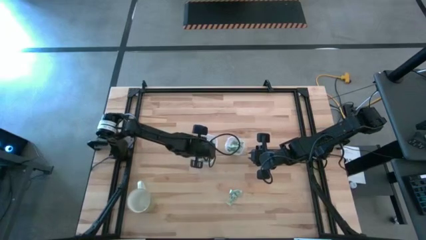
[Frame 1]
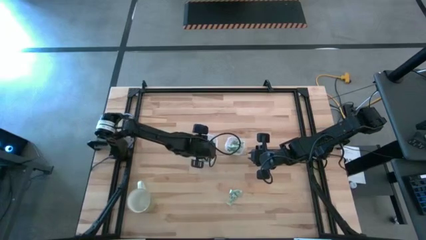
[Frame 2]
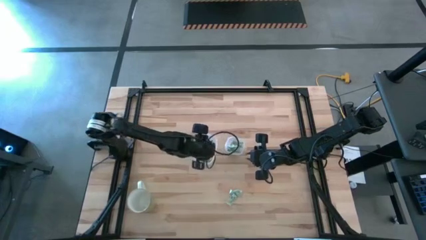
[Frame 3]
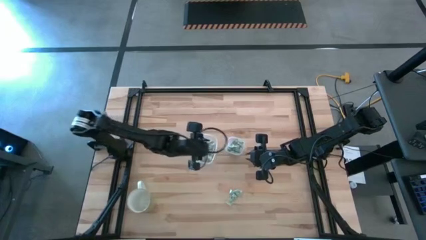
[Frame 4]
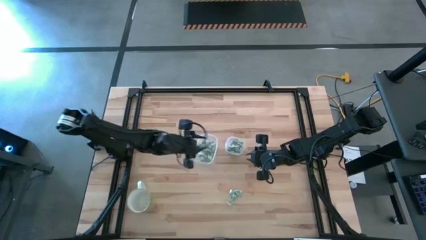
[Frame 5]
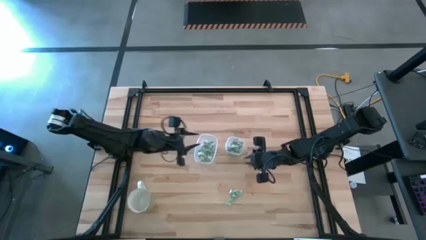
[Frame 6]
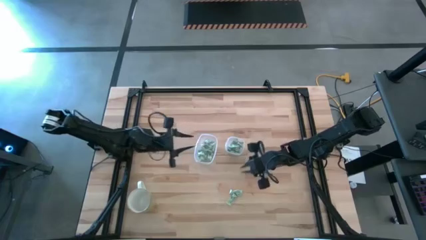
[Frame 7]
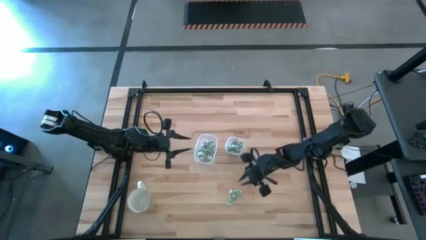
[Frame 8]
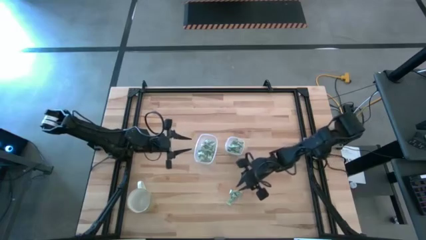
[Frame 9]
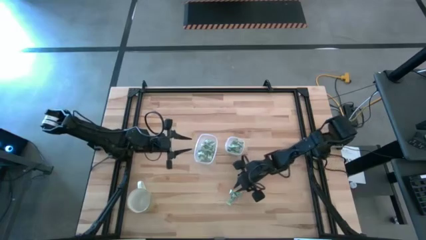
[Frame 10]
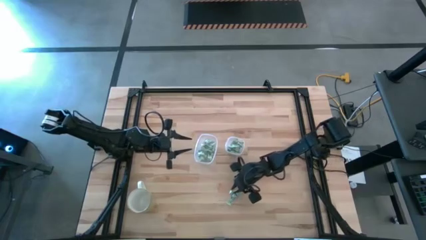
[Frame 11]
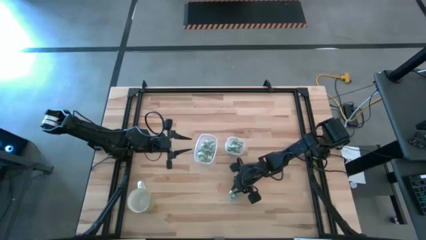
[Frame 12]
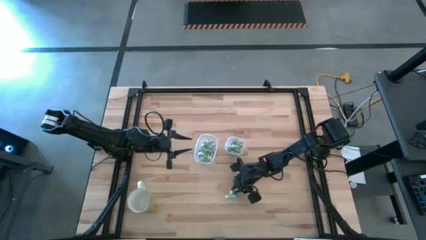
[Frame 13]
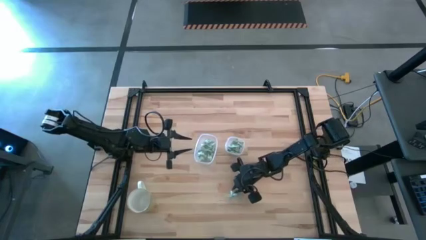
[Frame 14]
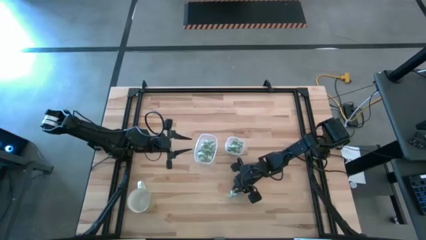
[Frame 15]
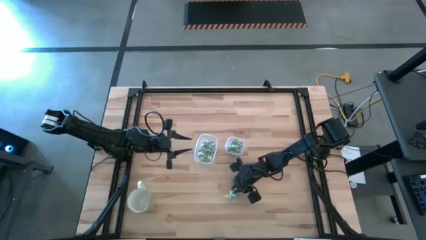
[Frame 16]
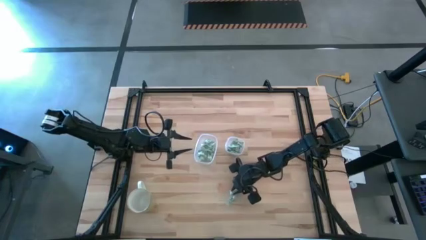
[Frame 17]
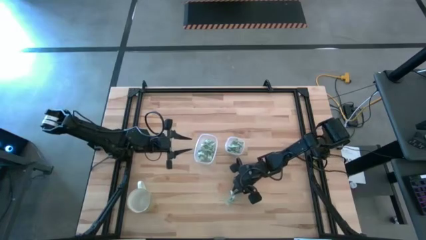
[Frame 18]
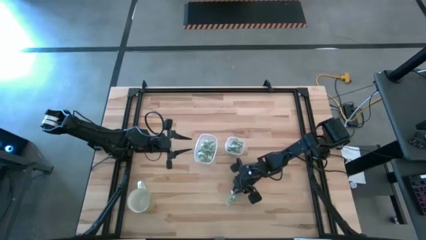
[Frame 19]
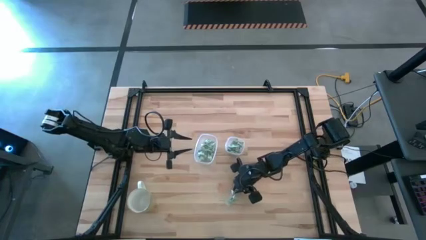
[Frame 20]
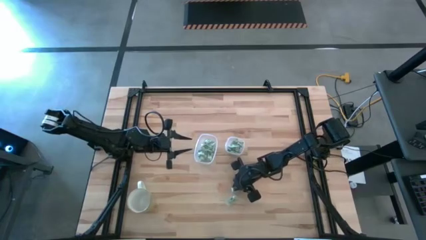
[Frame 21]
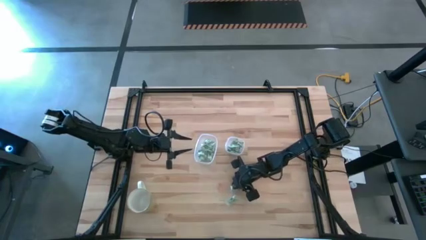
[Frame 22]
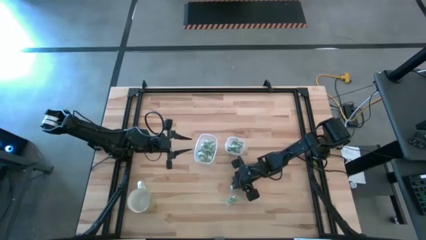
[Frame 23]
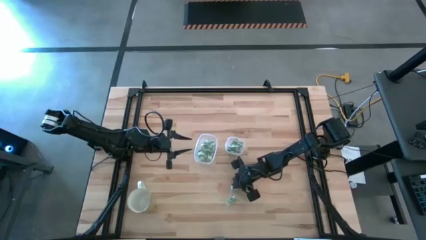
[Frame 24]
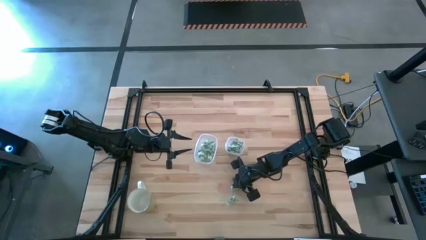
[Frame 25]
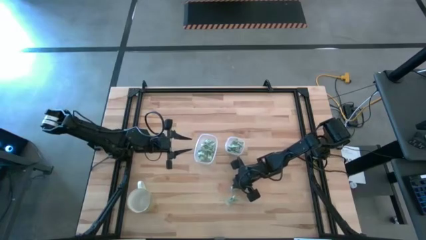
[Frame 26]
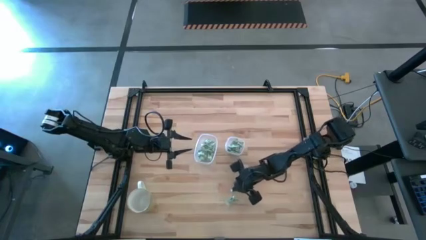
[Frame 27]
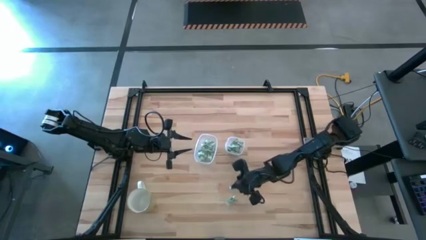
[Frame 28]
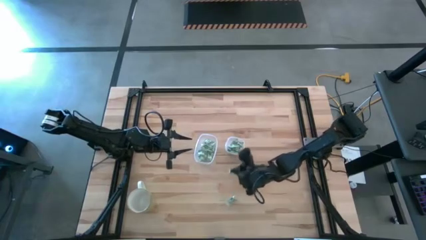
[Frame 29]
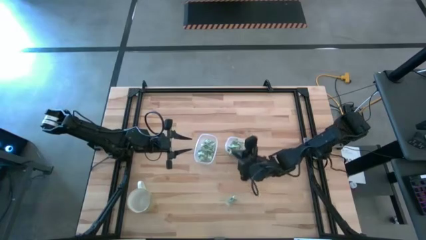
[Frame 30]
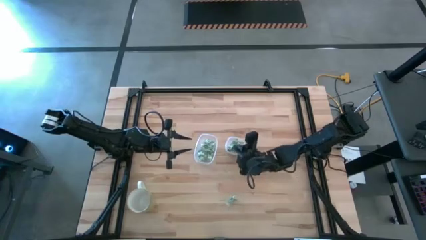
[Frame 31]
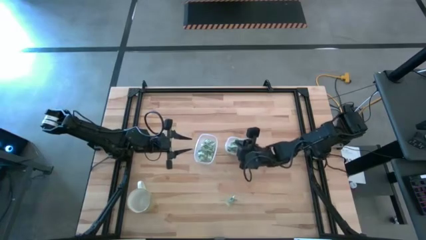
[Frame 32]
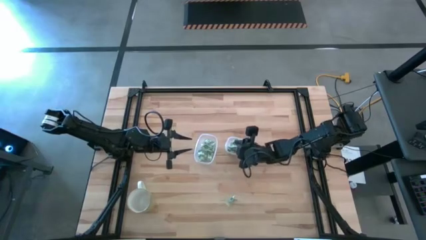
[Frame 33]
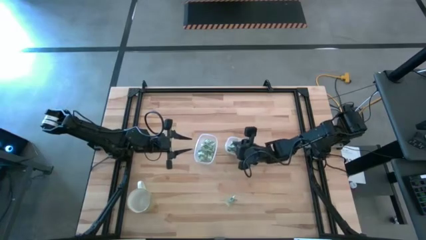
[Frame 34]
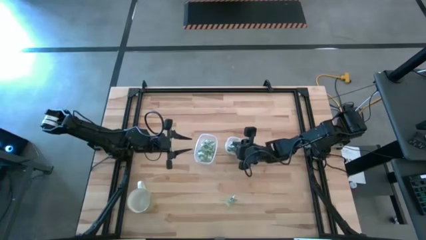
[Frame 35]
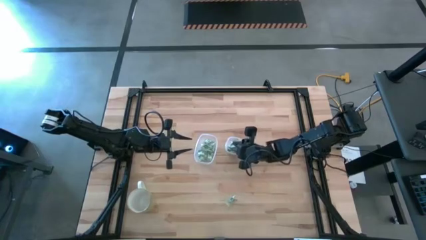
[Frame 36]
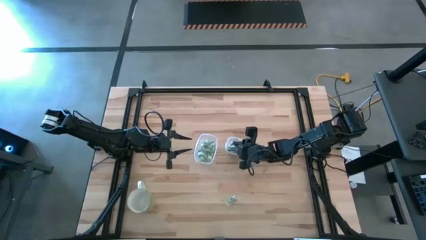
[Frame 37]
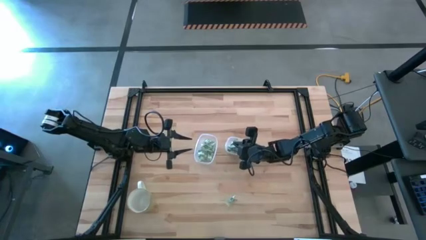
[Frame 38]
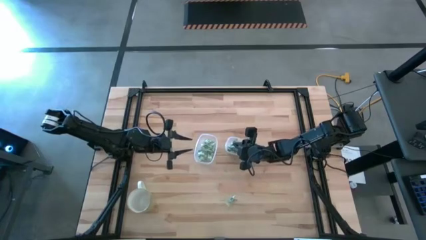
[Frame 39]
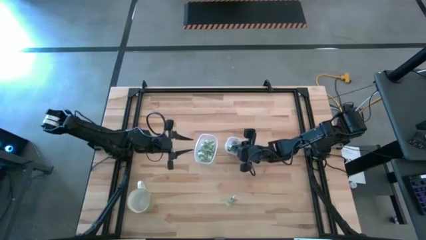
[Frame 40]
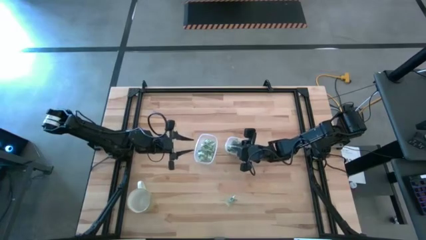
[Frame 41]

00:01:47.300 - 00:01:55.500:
Task: Pick and place items into bin
Put the white stevia packet into the right transparent bin

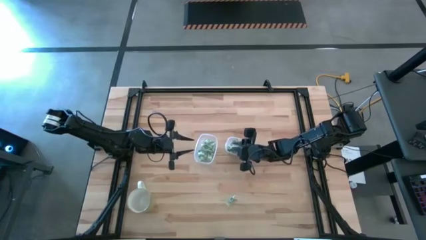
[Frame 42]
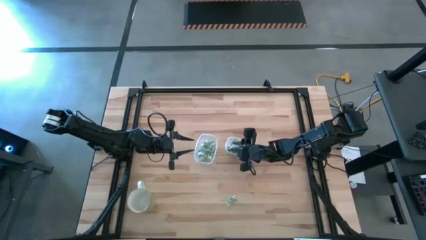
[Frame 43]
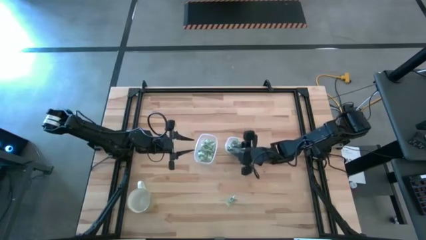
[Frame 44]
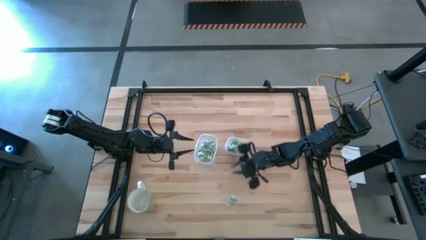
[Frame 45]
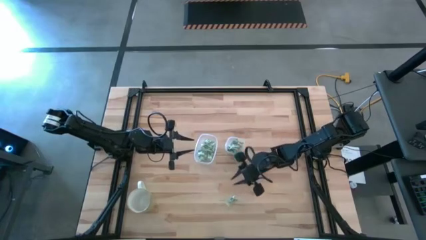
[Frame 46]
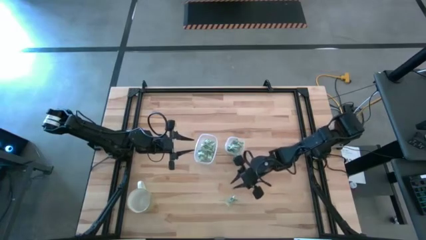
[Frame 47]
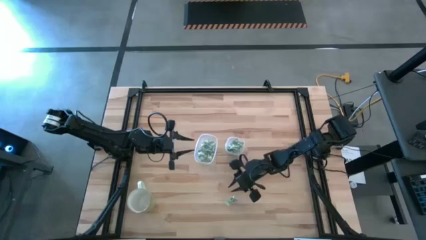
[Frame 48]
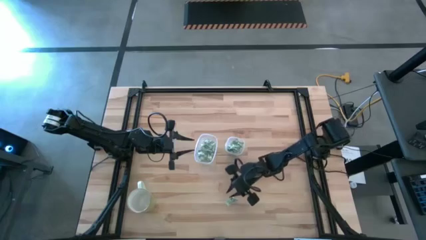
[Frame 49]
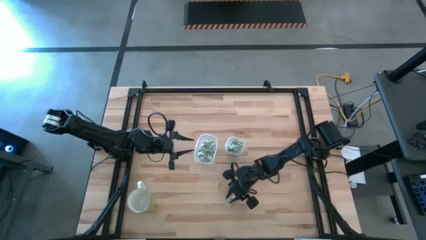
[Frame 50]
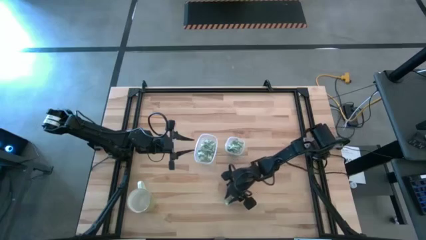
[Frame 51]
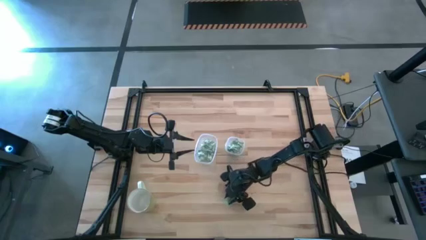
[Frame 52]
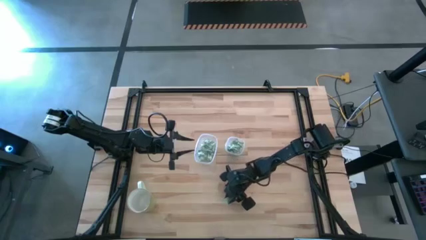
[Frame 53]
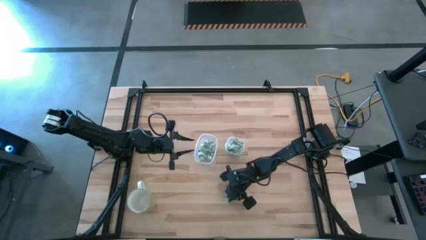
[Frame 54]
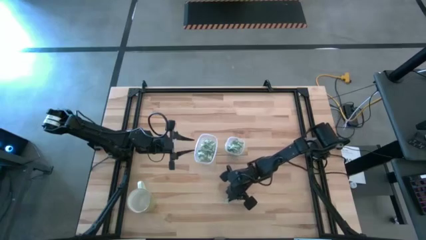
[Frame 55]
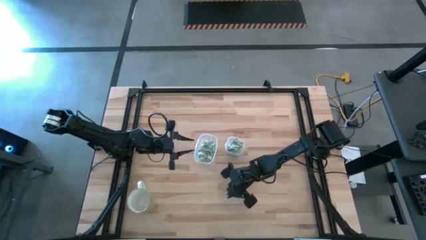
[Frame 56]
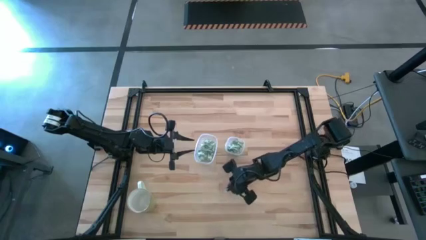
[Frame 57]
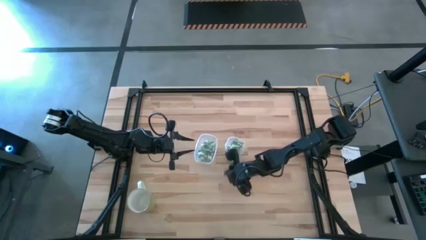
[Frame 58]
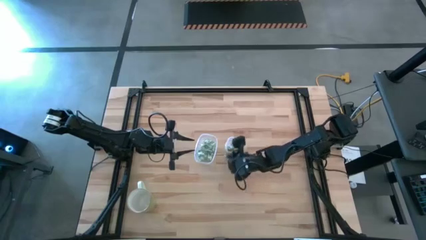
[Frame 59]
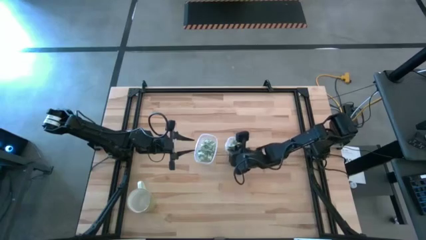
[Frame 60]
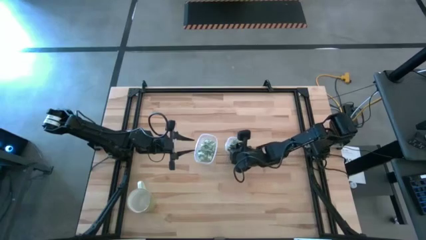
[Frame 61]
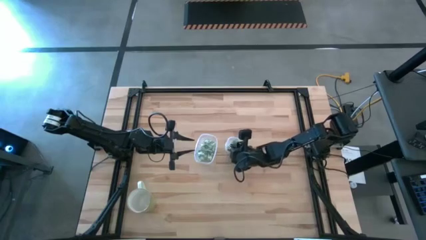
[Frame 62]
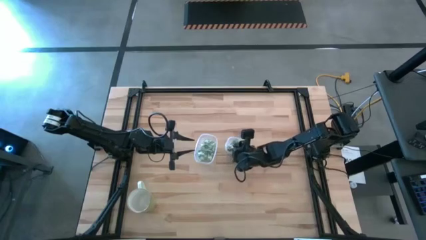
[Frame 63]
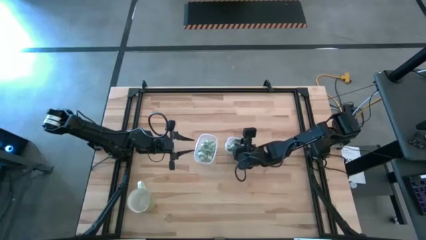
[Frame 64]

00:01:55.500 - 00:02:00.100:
Put the white stevia packet into the right transparent bin

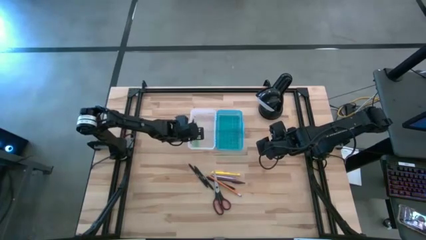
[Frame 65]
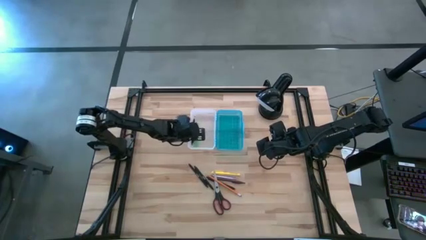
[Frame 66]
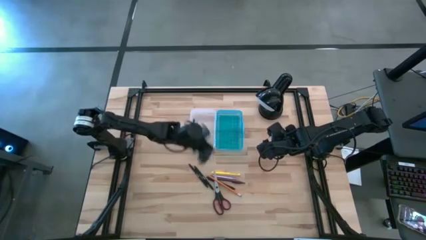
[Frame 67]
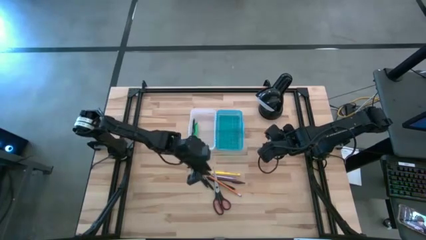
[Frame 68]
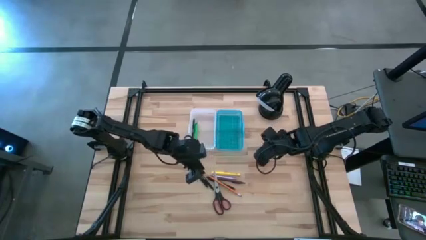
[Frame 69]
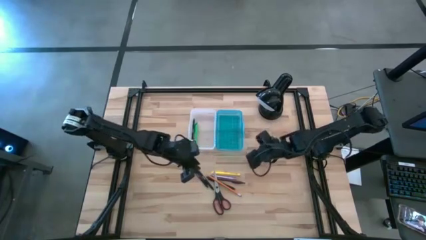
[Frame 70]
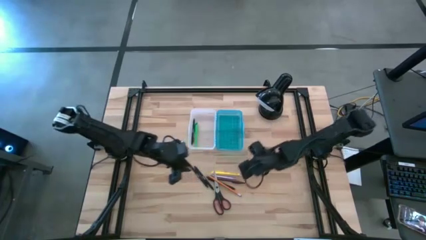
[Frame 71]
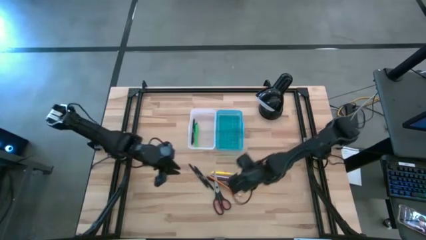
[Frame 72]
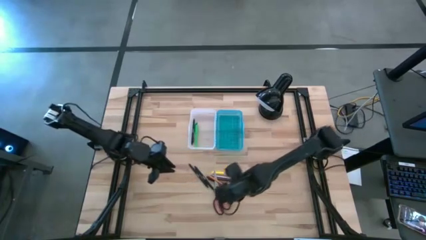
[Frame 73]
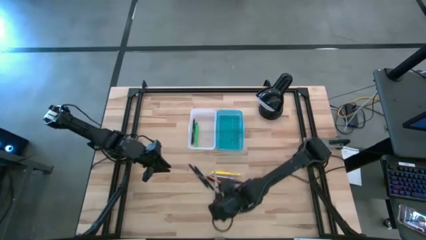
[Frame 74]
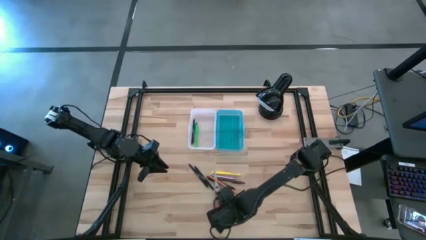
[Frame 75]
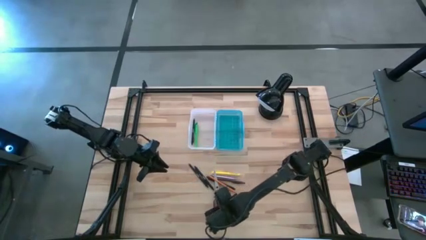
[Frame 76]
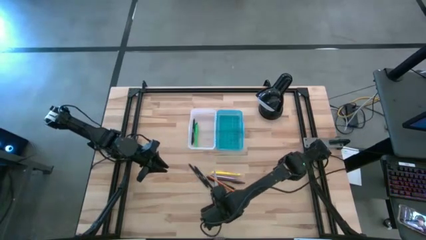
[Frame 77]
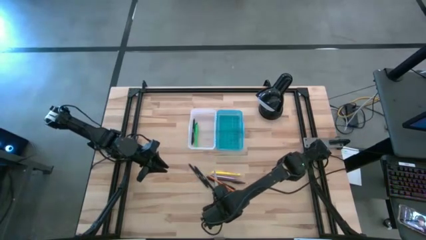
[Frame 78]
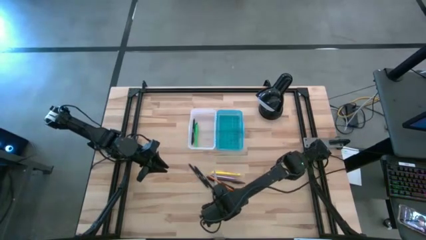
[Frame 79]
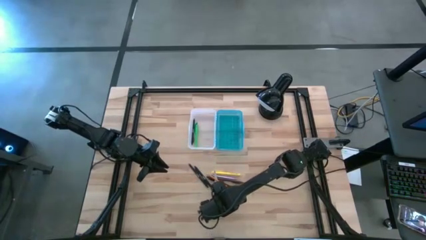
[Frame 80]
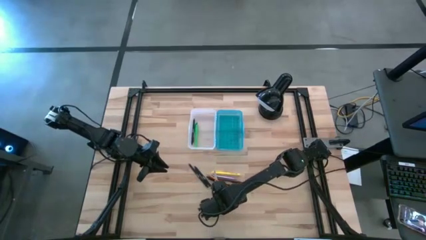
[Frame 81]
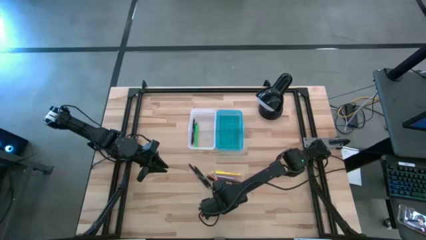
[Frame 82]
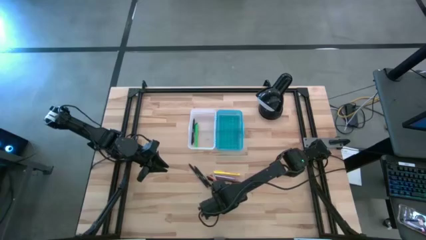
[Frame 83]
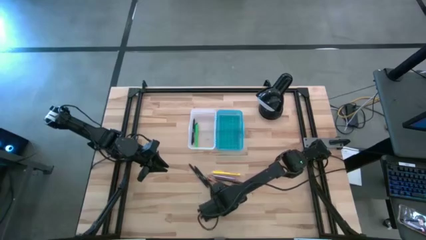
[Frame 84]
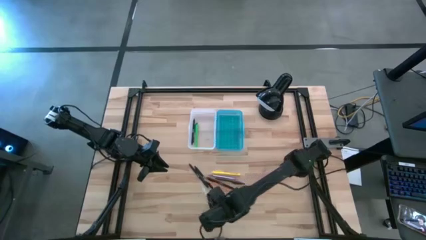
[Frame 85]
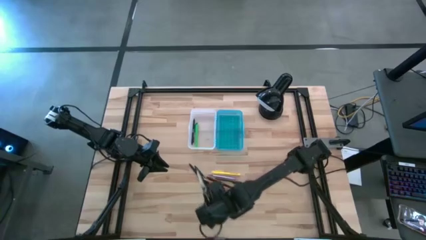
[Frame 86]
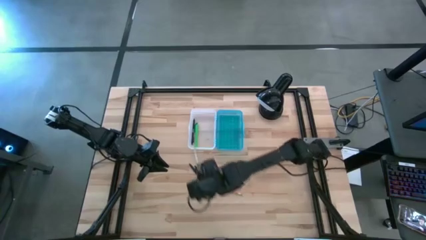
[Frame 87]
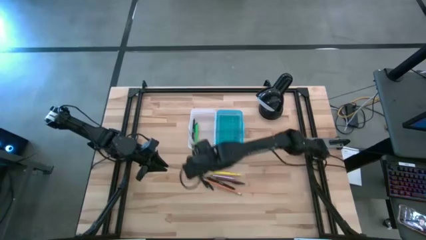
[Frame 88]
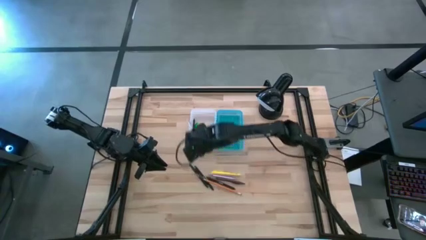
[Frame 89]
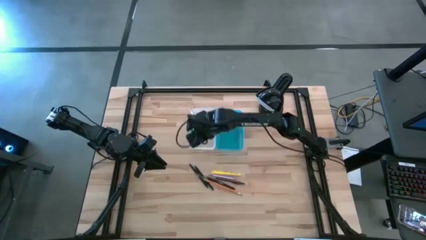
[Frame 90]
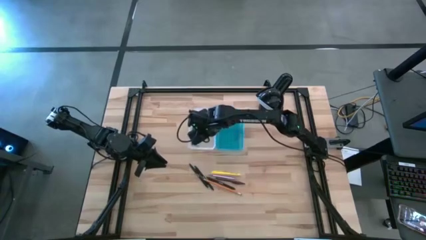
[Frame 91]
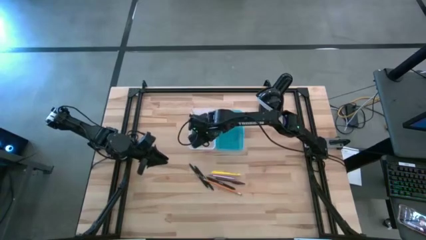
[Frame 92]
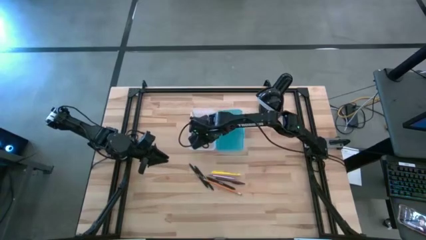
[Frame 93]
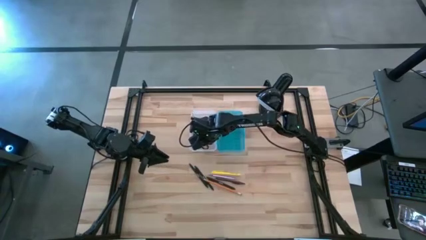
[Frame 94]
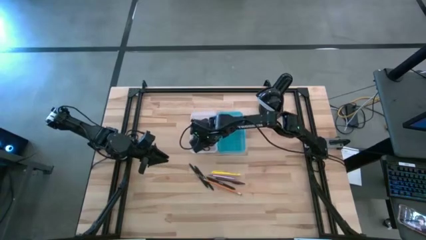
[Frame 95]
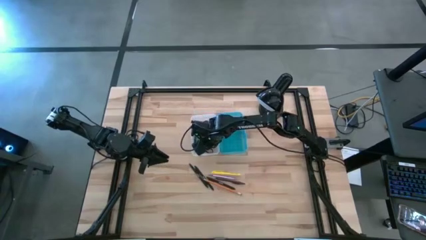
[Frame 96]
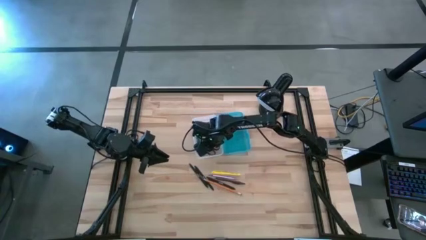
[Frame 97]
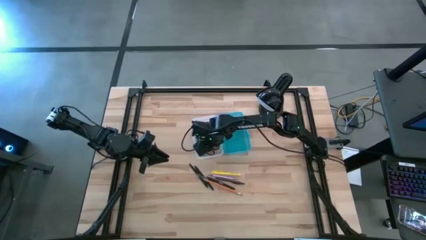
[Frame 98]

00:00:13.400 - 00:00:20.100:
Task: Pick & place school supplies into a supply box
Put the black scissors into the blue supply box
